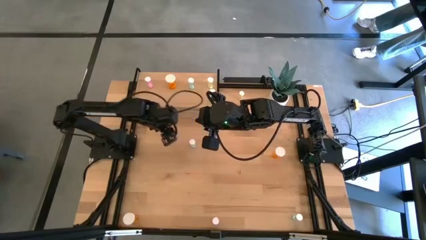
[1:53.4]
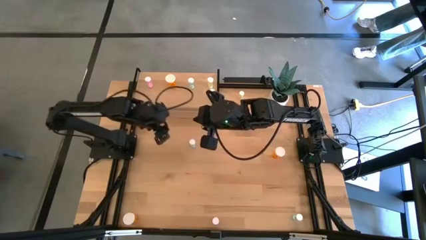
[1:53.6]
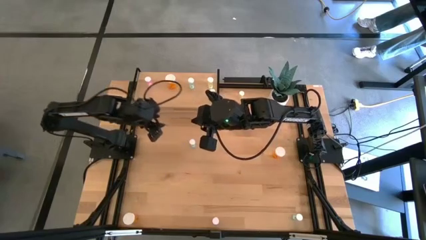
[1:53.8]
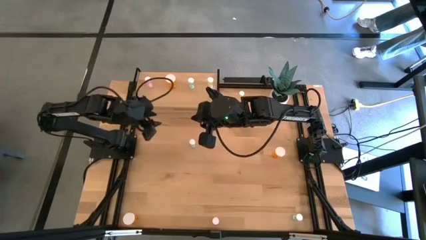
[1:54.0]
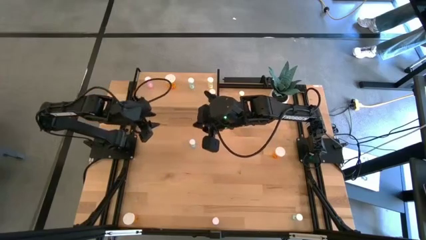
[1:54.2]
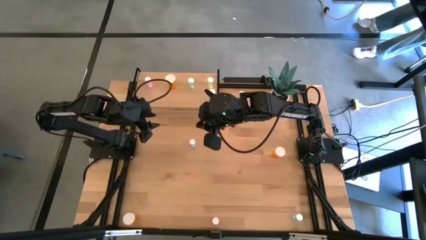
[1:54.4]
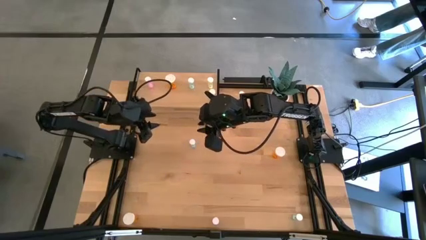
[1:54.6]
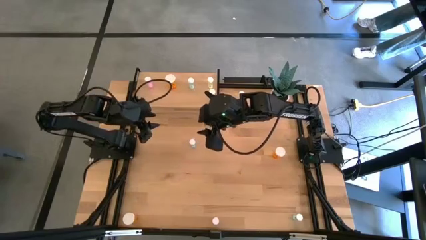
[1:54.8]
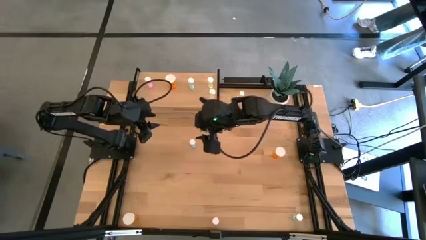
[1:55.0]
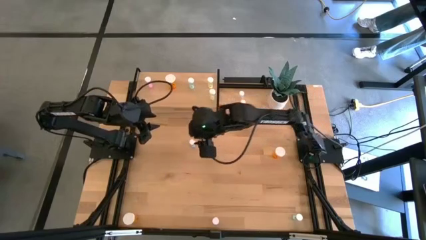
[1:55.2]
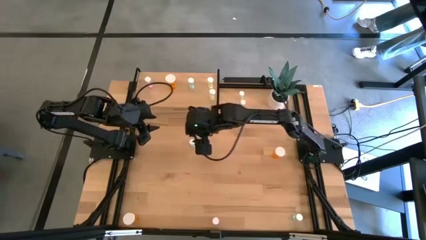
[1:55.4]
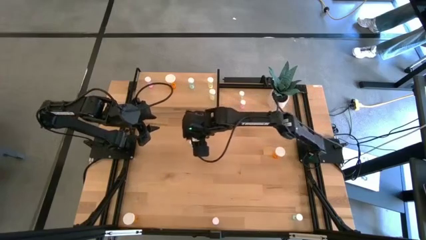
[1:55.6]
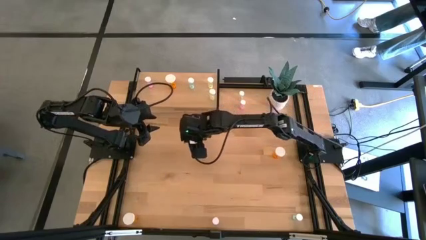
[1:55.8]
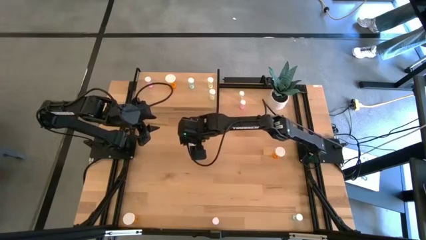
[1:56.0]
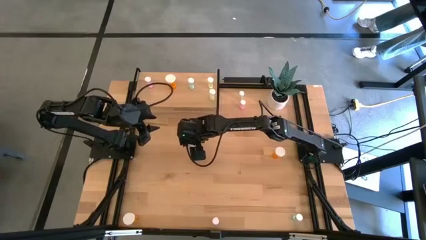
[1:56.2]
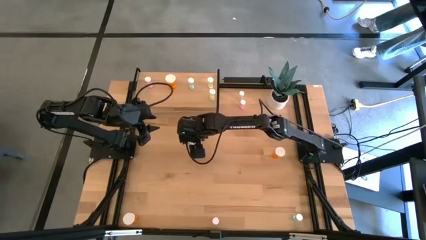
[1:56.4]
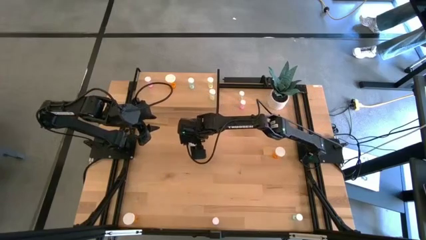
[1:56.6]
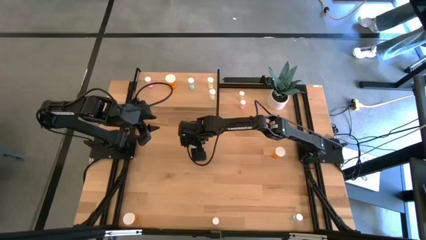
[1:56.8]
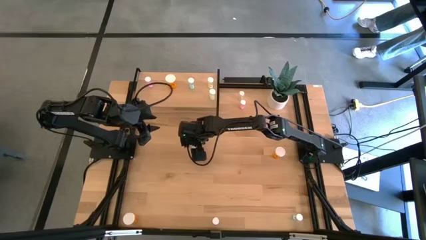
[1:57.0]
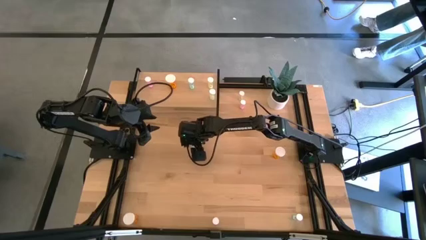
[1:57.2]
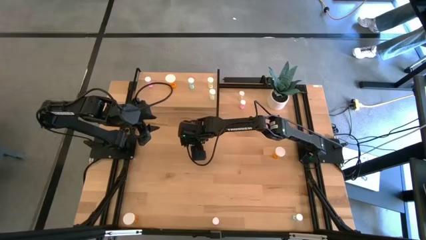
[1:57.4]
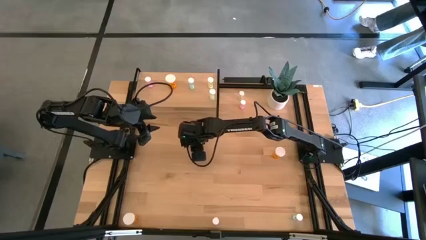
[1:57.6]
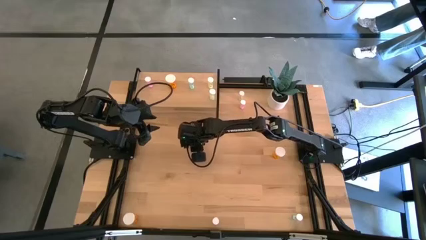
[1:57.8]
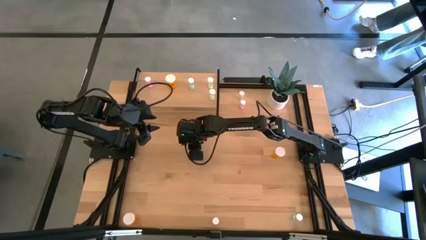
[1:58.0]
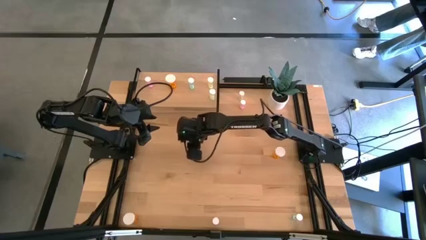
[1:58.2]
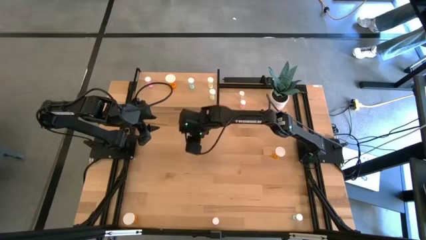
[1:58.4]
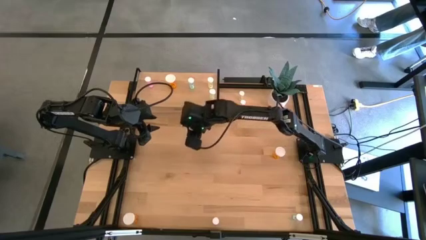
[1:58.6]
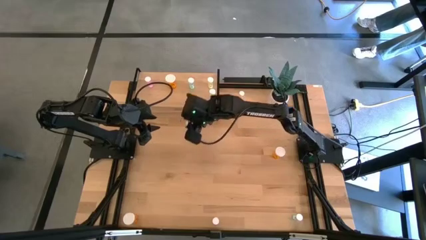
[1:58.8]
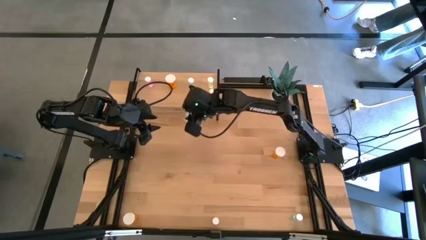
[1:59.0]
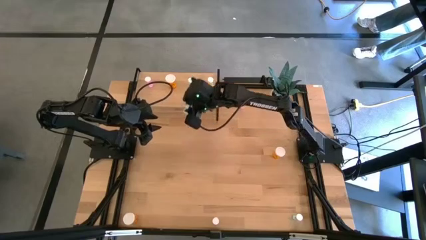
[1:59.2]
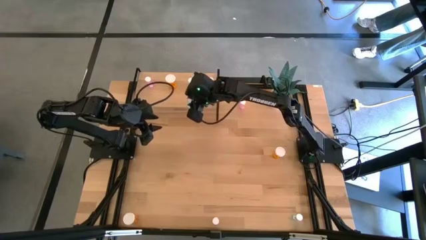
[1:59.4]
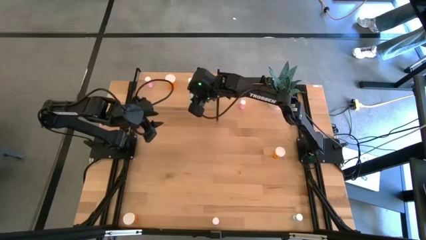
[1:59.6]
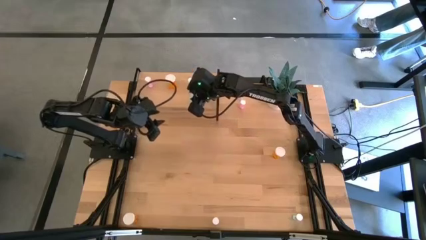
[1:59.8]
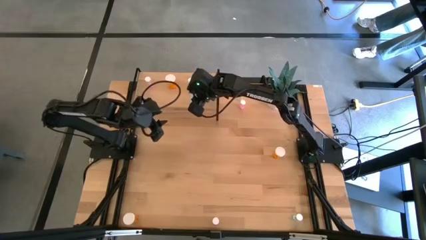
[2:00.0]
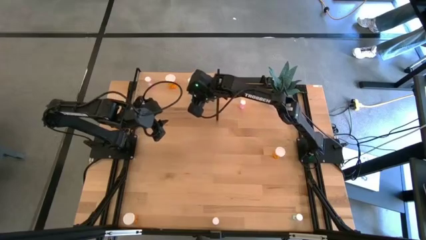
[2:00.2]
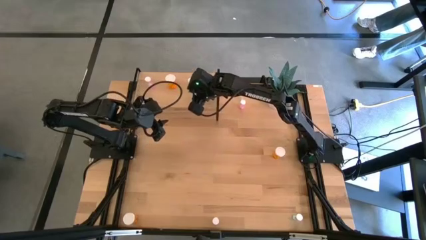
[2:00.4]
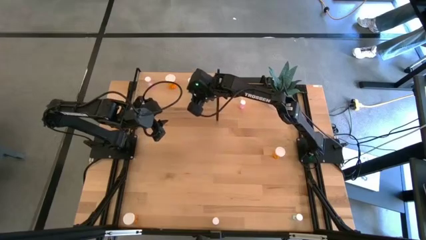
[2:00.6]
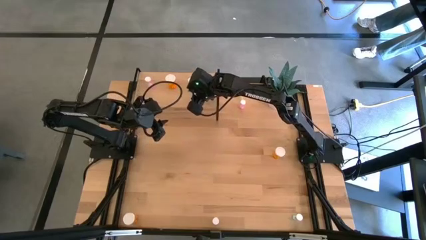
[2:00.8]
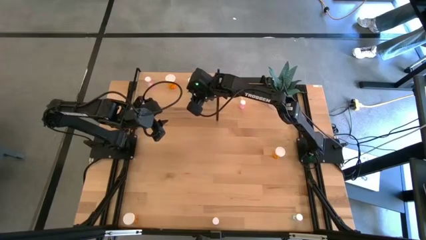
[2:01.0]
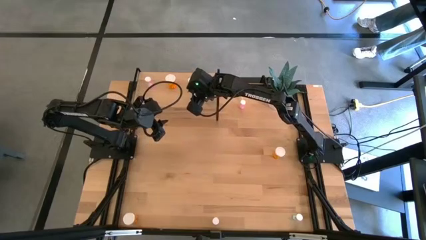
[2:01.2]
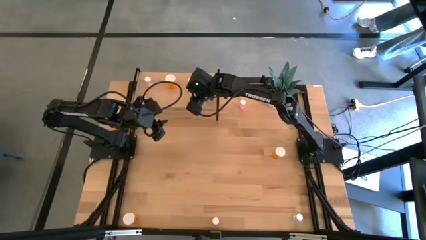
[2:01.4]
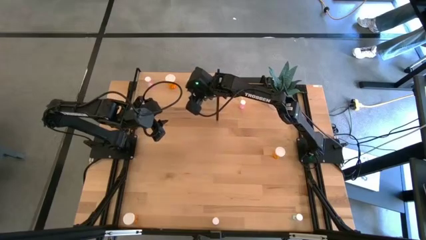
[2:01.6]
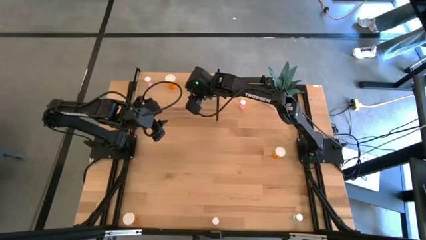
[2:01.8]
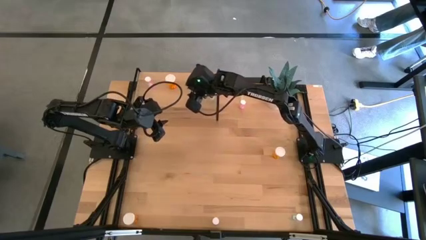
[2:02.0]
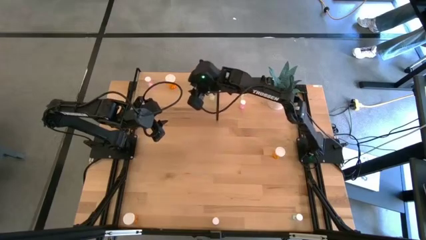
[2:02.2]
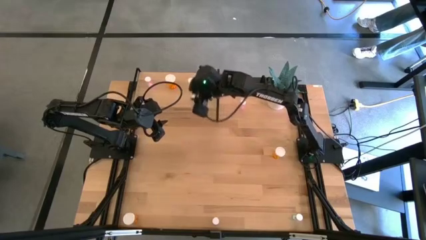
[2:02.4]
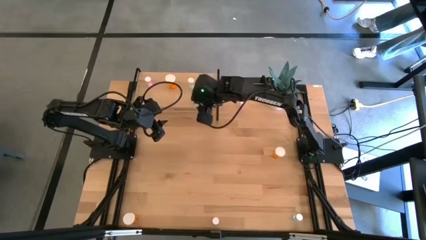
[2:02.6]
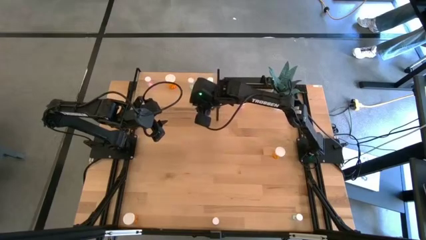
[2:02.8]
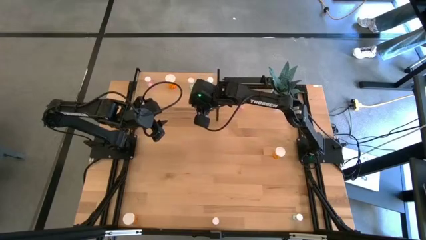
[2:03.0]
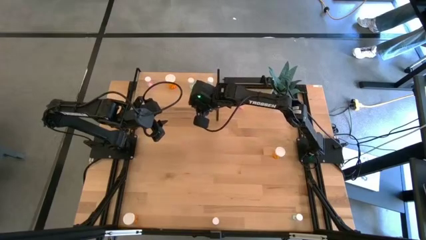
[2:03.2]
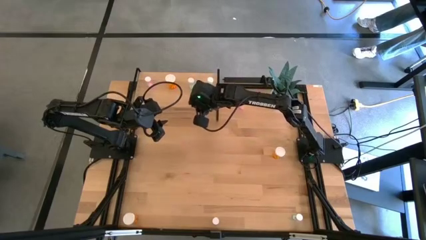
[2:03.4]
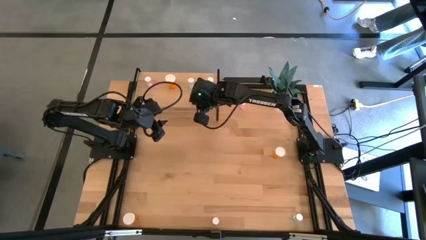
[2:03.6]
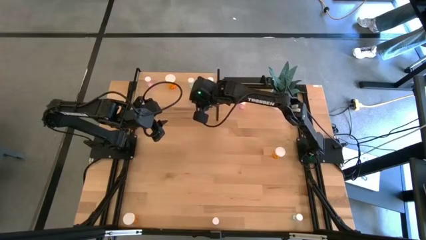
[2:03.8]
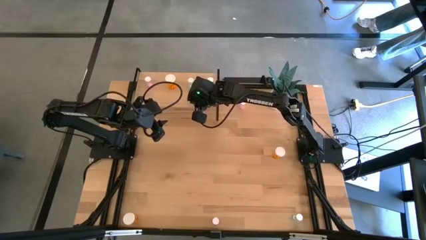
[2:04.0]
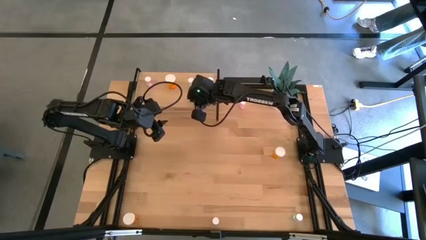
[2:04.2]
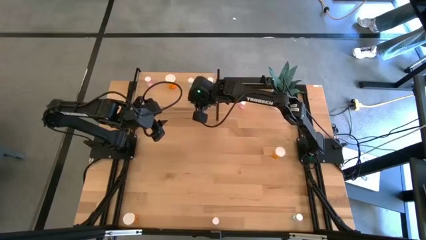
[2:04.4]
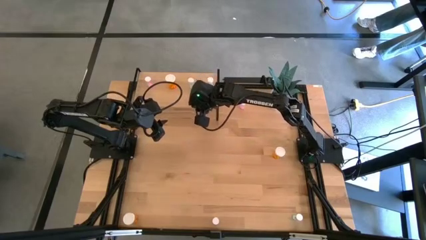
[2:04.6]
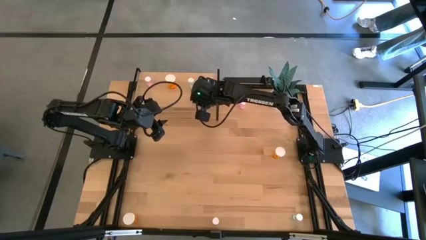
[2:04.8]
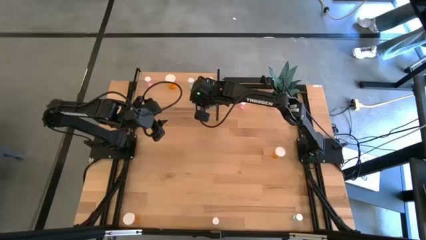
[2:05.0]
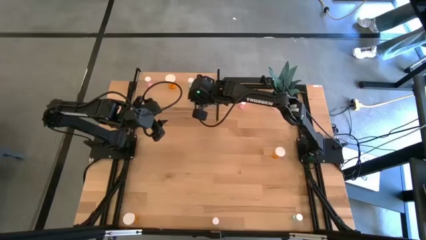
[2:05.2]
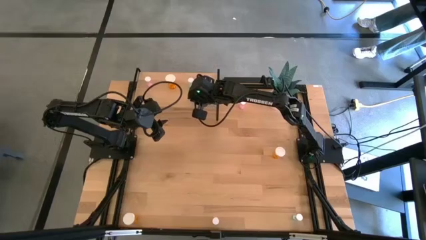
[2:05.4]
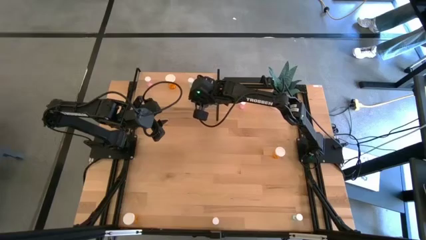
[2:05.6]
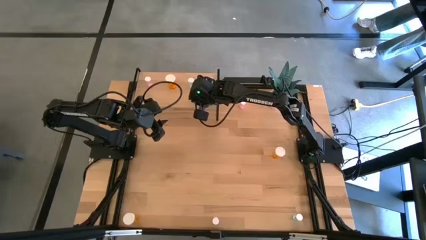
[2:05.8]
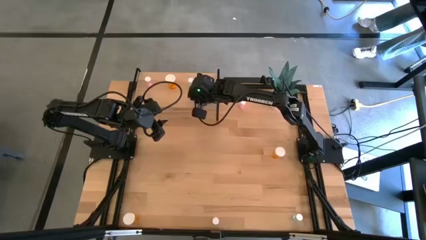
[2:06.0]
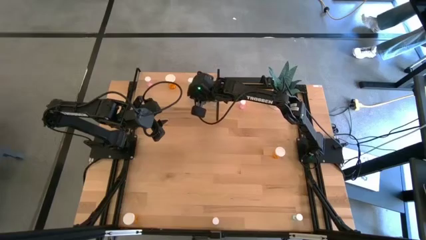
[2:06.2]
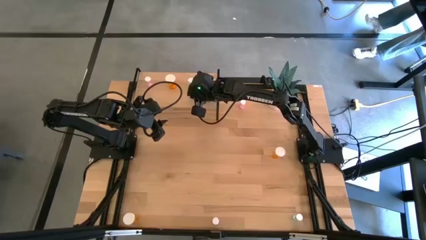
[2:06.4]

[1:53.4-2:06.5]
Task: Pick and place medicine bottles onto shelf by color
Put the left blue pill bottle on the shelf aligned with the other blue pill bottle
